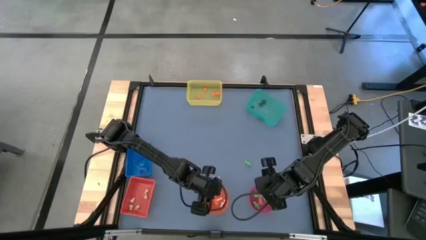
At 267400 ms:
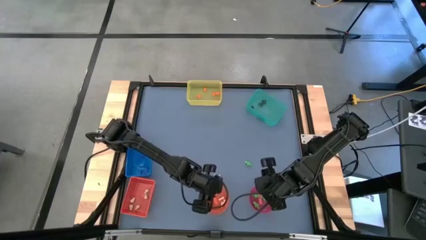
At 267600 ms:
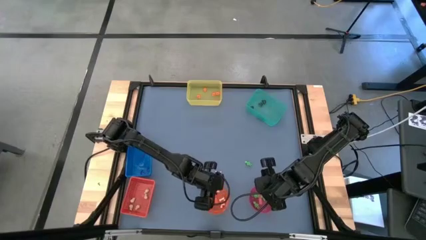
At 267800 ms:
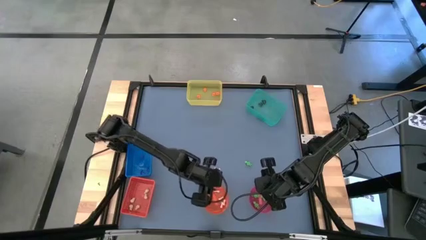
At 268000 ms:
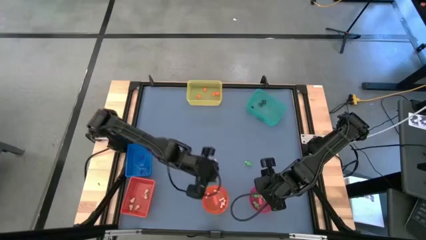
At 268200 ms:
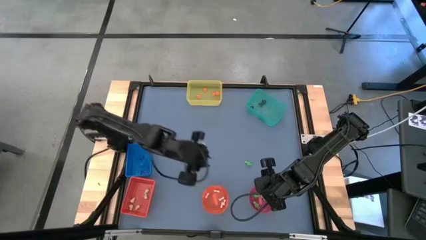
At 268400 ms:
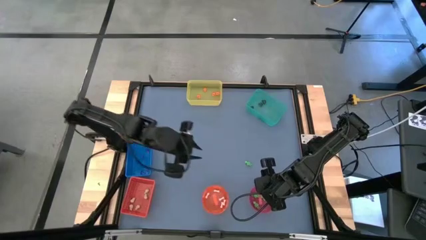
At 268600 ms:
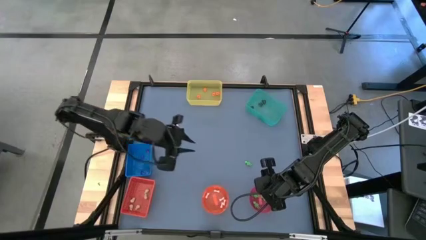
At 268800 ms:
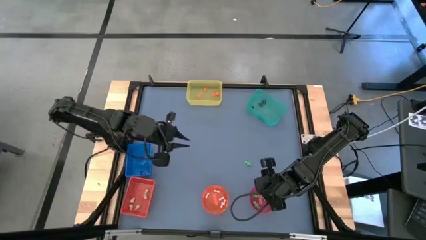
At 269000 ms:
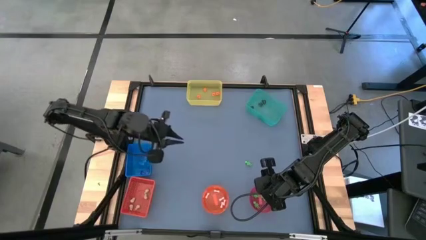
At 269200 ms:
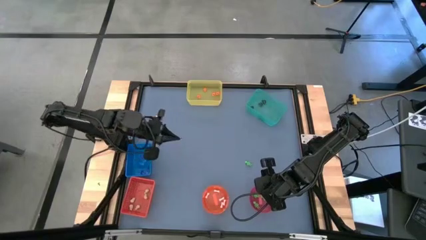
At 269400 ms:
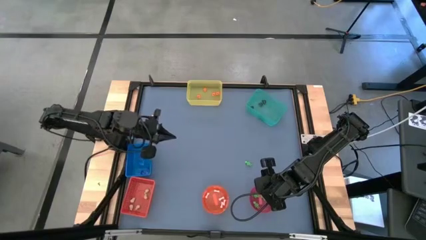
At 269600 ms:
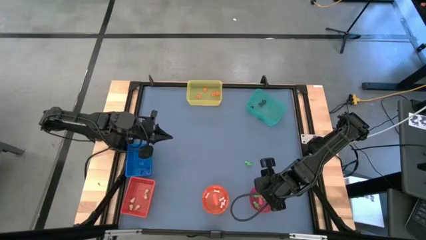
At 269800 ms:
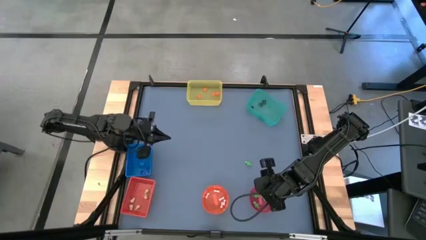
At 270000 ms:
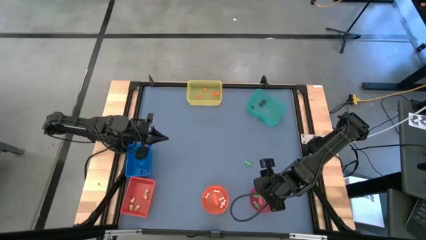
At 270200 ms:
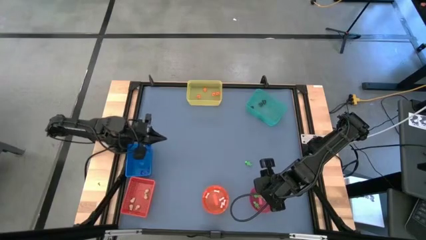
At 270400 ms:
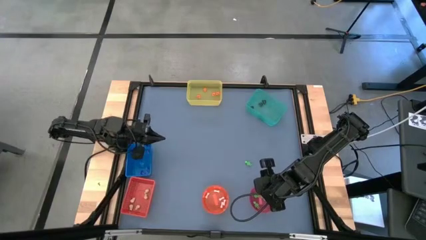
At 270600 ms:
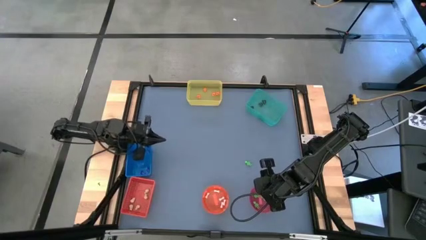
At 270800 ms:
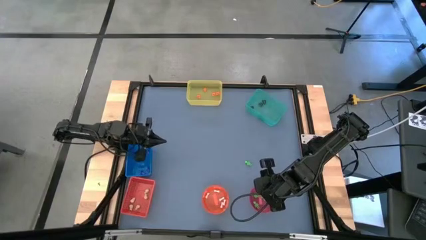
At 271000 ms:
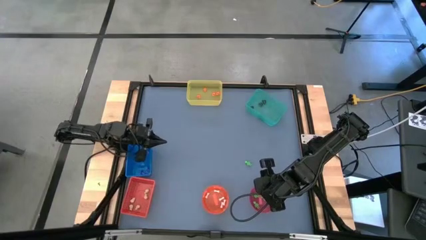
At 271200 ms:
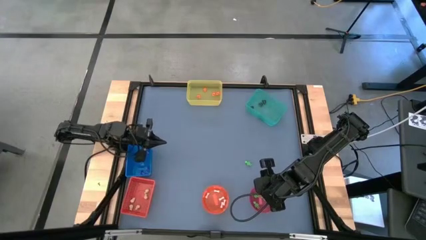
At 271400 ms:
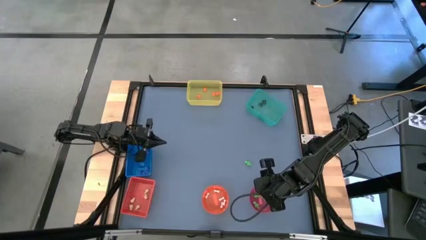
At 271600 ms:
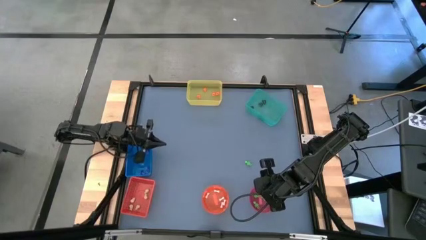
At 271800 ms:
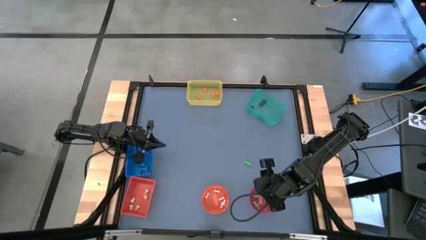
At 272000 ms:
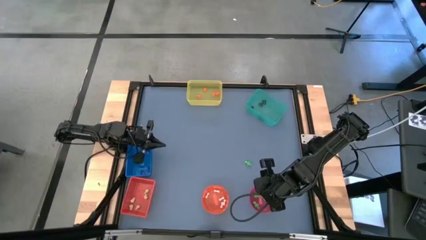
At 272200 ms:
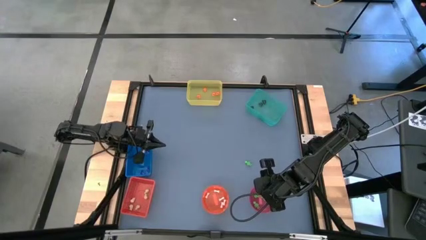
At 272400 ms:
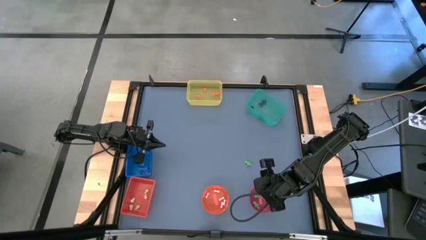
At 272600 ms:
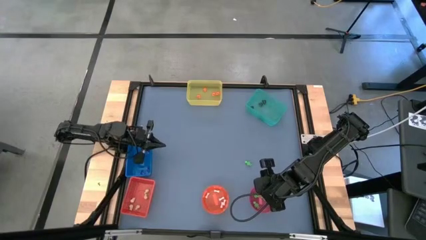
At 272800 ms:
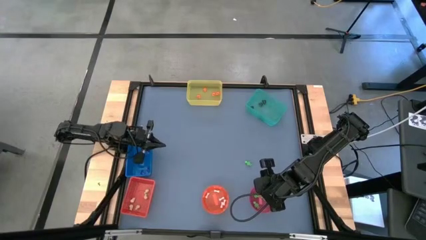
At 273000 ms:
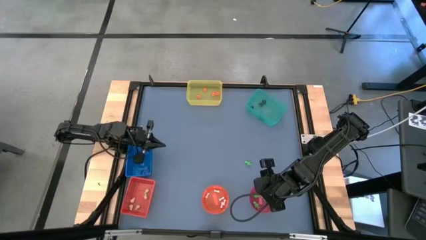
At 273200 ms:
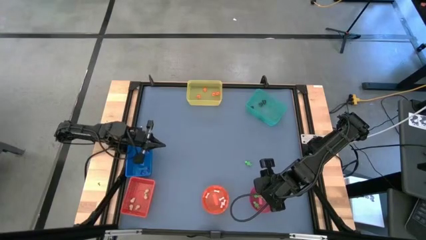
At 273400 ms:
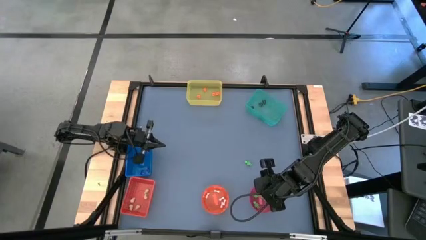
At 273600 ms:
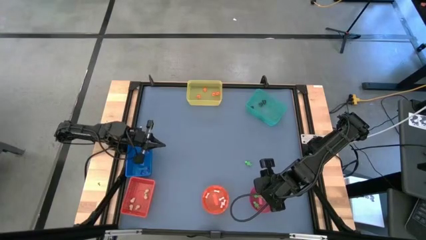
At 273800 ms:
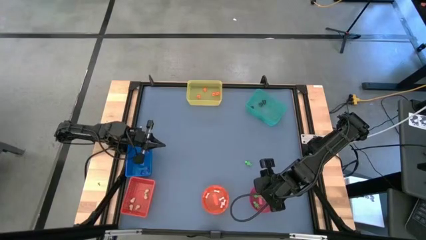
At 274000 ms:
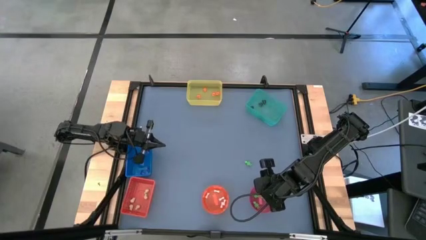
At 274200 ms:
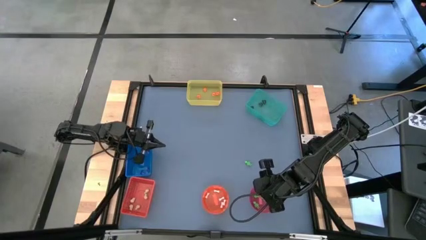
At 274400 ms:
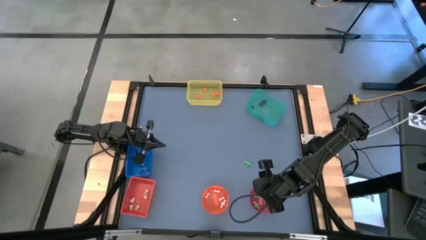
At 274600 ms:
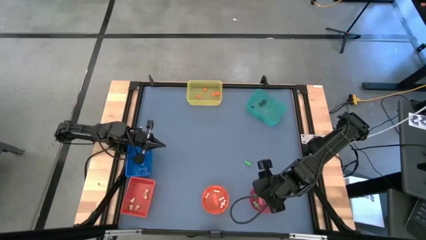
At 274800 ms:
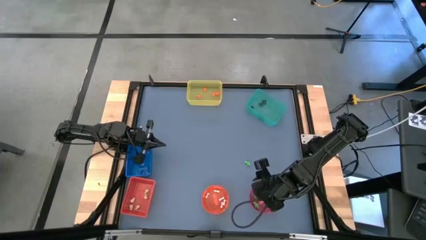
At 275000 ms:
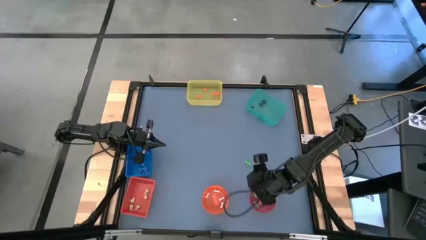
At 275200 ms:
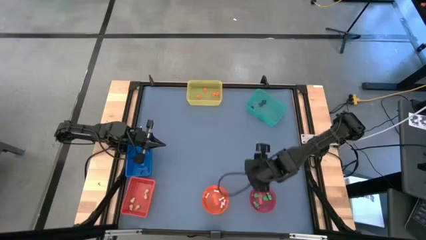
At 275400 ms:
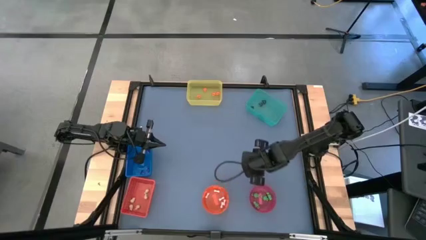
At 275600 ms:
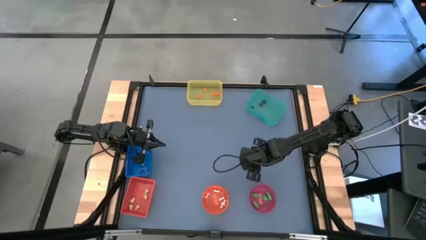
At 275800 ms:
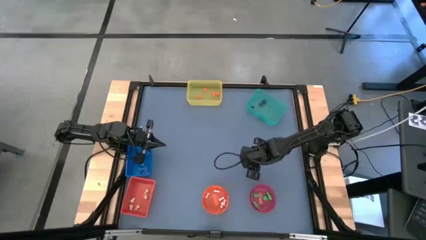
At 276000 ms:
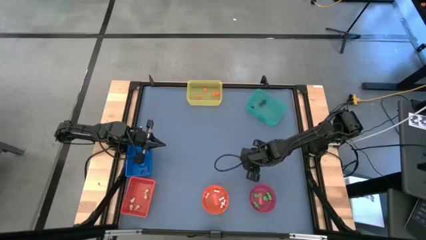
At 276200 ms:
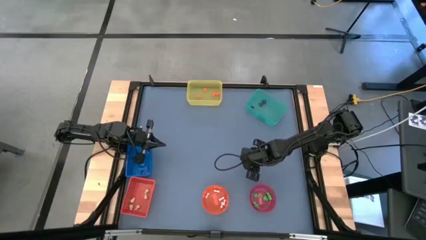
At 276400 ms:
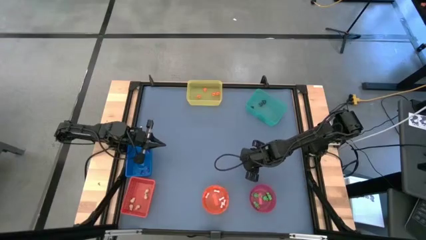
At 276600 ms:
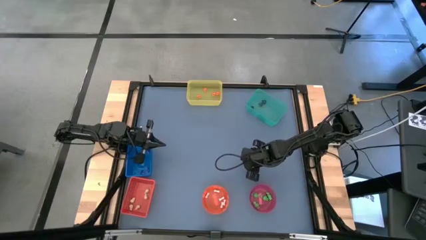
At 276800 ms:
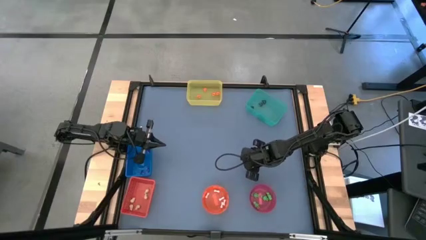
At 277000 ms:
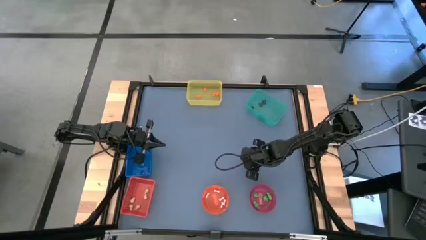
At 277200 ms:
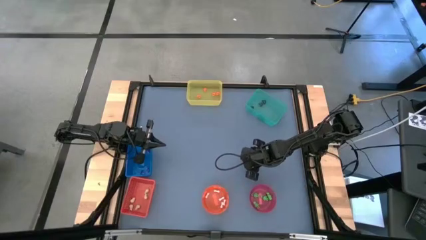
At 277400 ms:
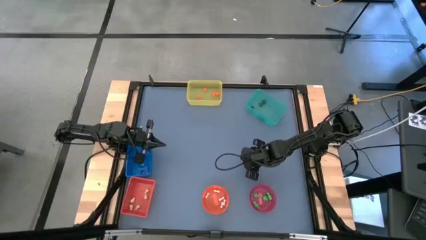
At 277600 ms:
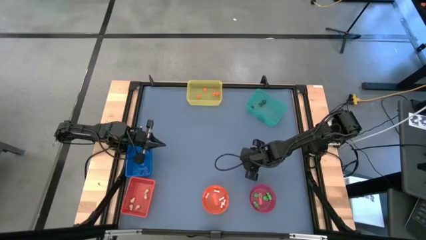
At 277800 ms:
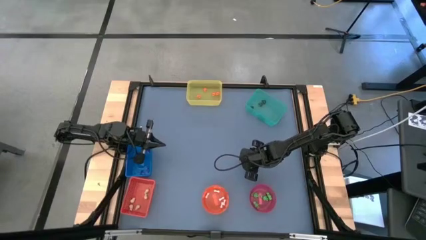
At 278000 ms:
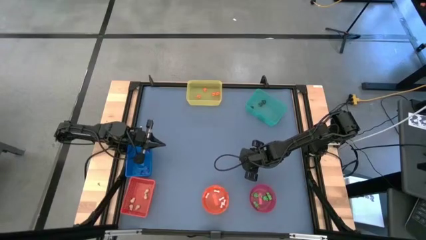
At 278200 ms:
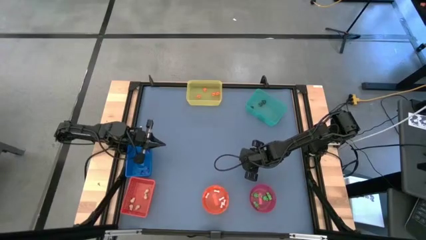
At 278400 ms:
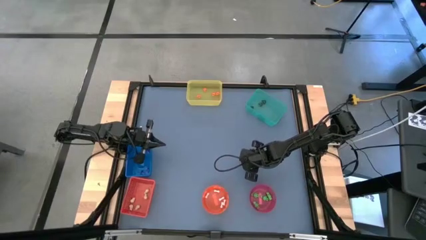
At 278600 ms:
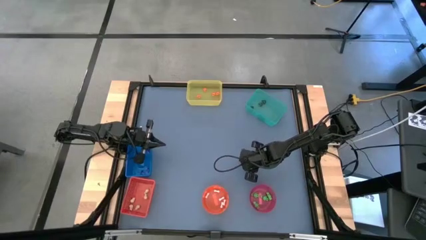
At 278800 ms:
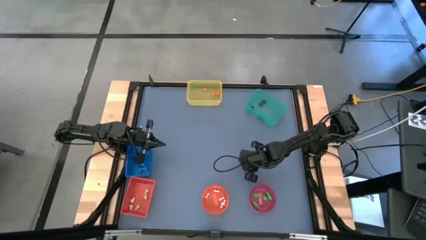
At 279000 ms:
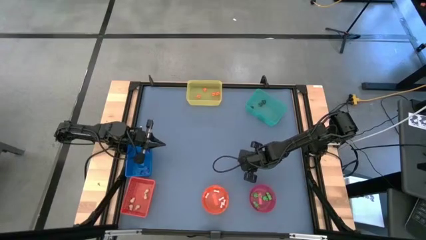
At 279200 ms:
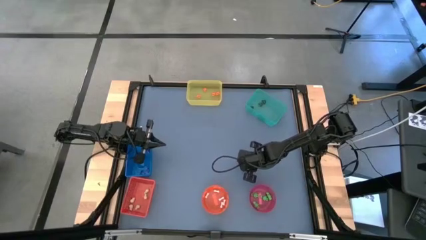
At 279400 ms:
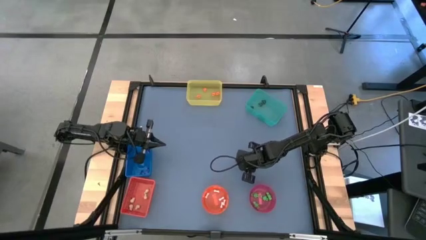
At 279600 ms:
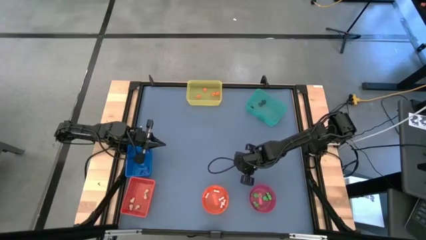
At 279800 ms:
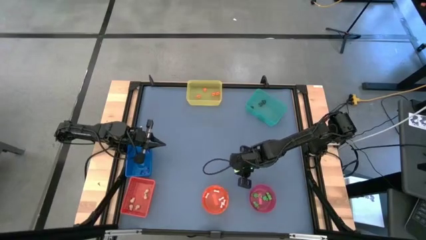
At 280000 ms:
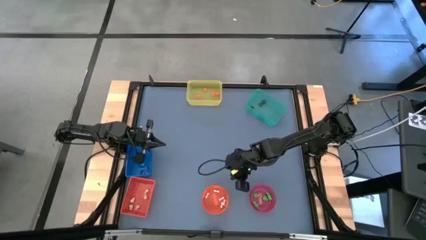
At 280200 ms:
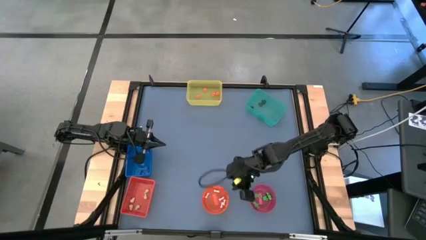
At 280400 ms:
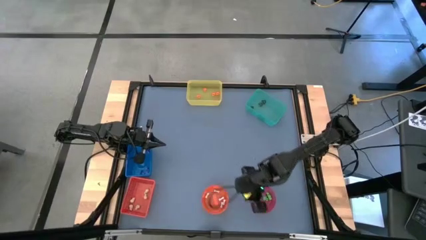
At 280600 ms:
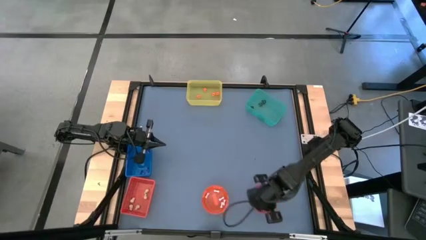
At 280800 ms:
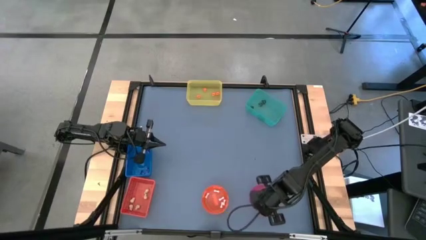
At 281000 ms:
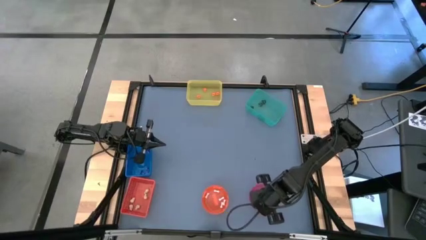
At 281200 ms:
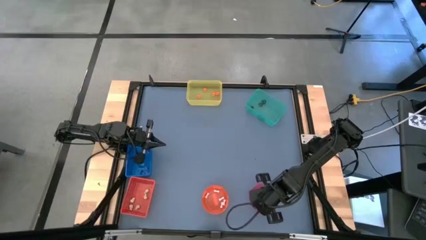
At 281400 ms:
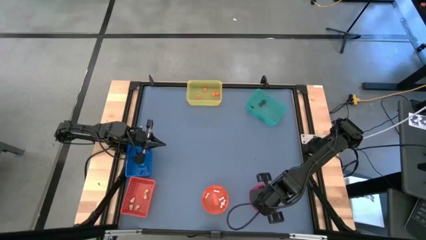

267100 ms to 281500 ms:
Task: Sort Halloween decoration
Put the green skeleton toy into the pink bowl
